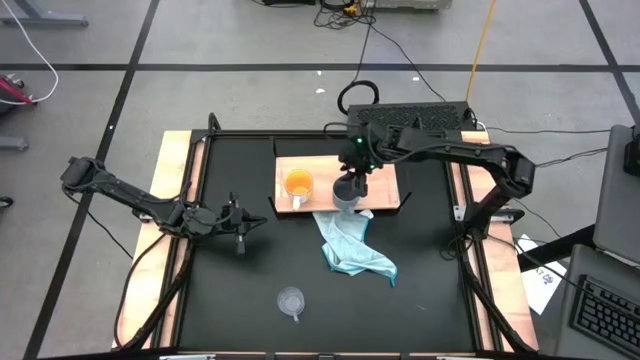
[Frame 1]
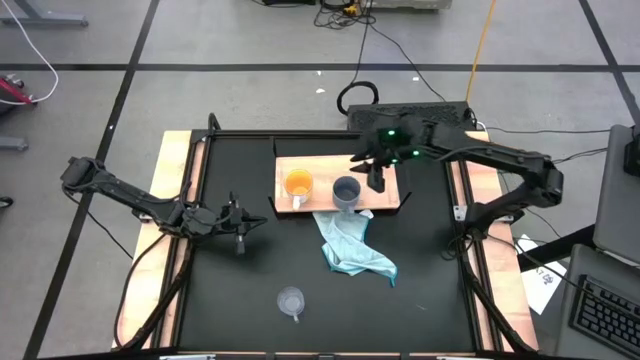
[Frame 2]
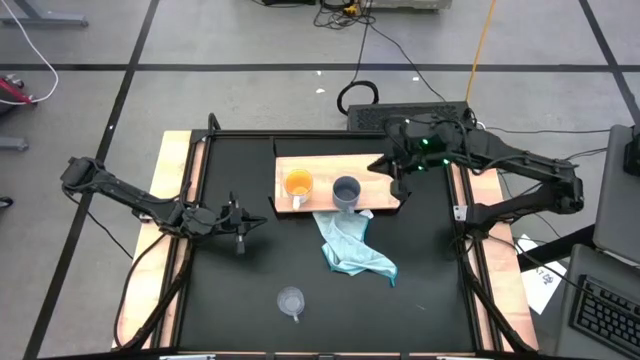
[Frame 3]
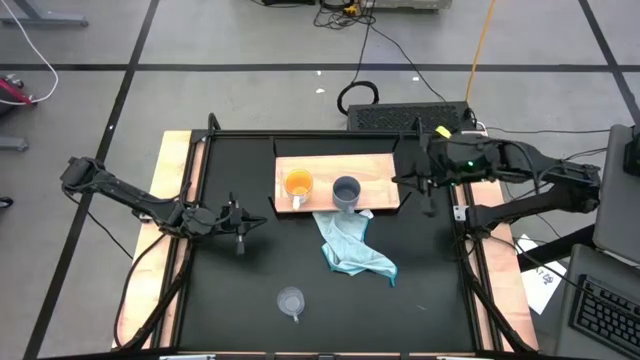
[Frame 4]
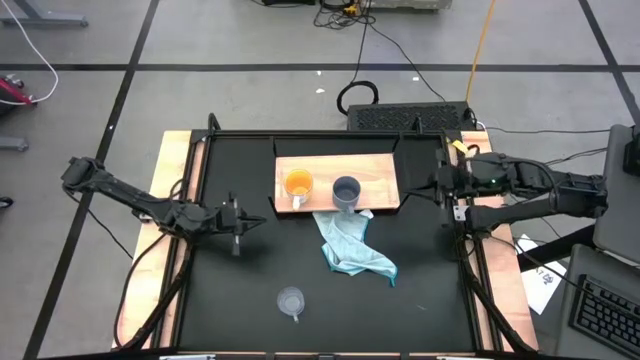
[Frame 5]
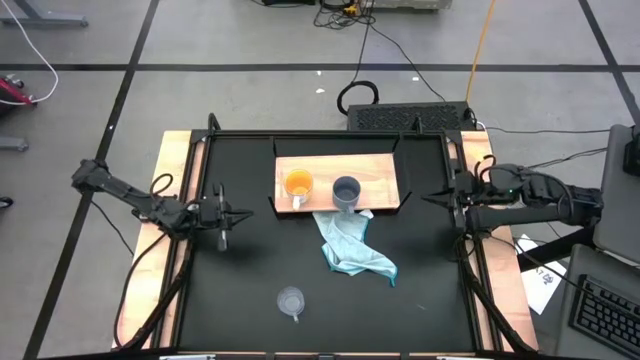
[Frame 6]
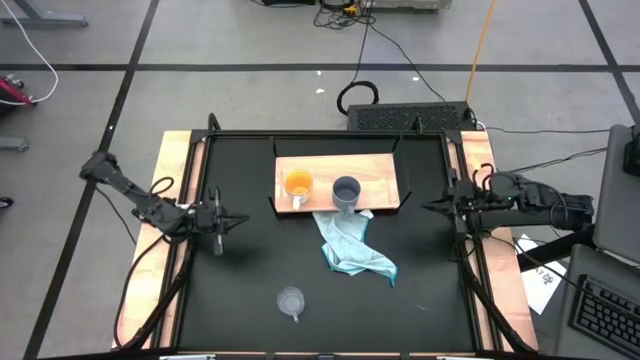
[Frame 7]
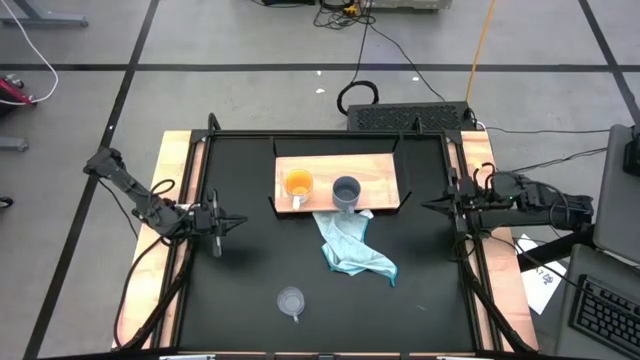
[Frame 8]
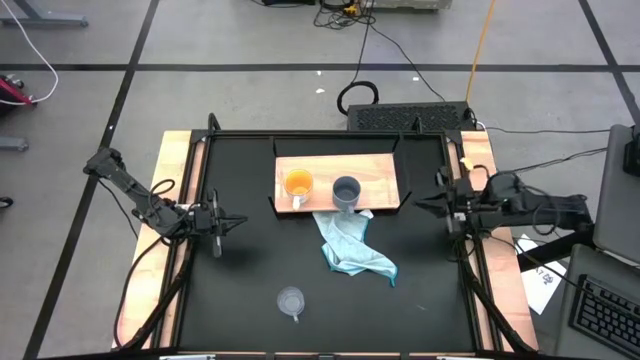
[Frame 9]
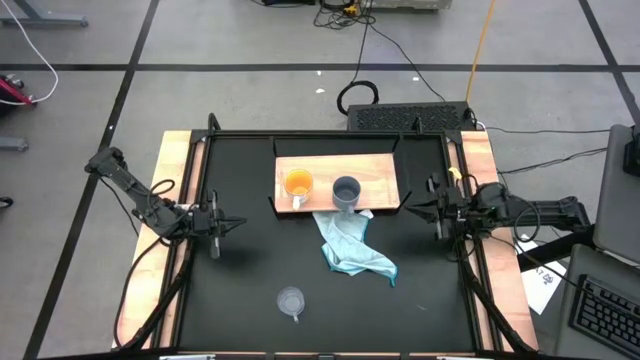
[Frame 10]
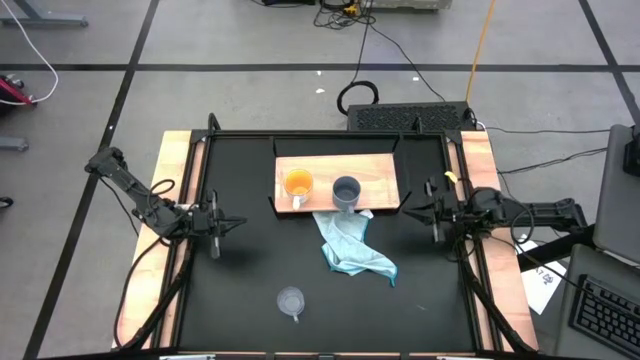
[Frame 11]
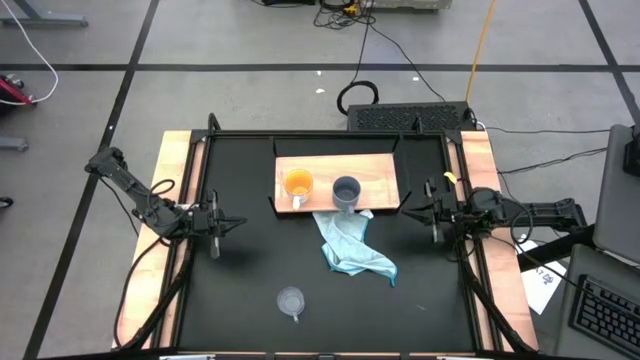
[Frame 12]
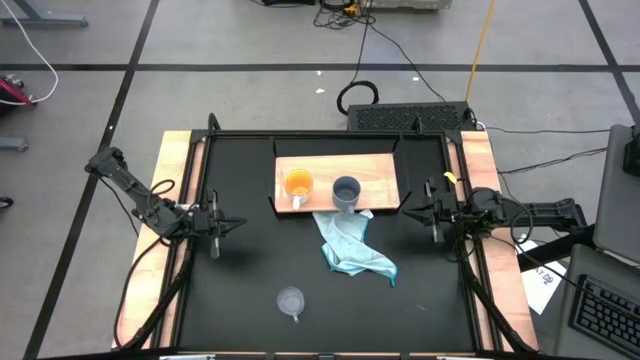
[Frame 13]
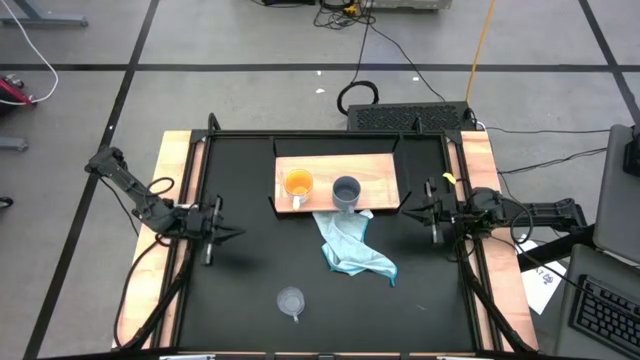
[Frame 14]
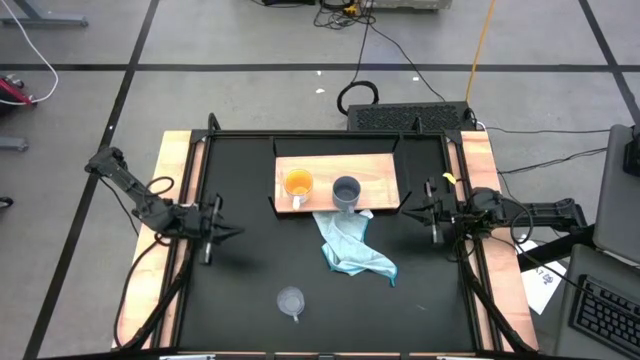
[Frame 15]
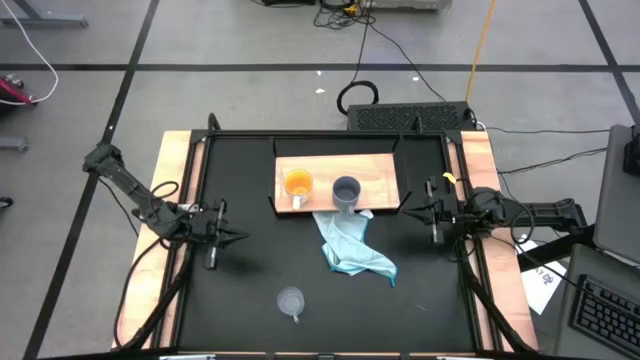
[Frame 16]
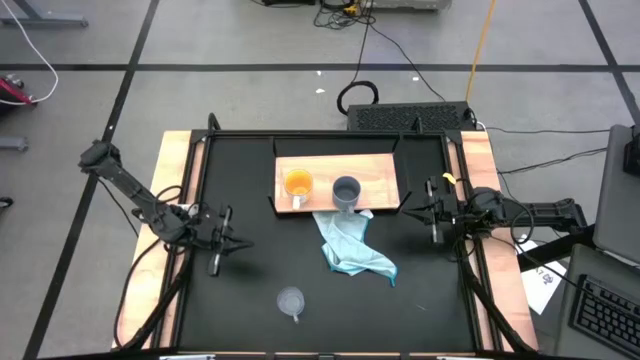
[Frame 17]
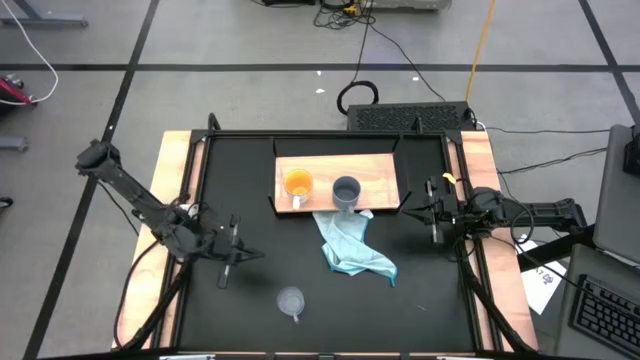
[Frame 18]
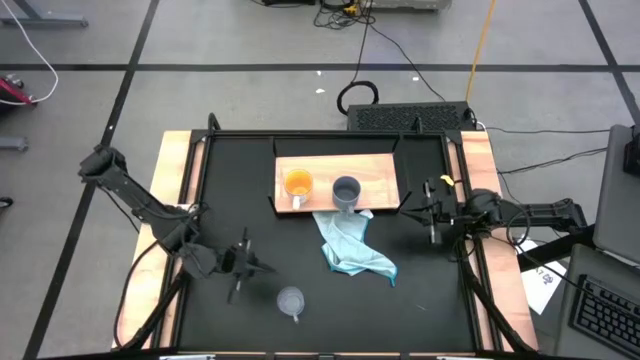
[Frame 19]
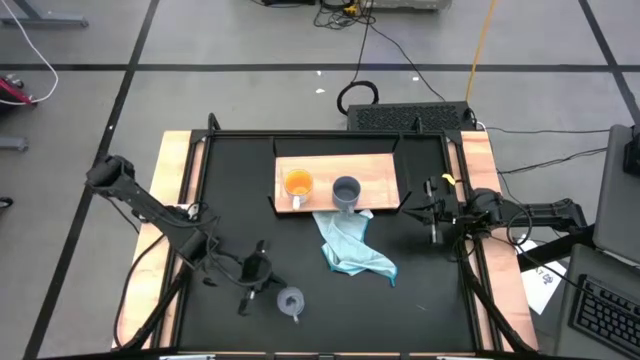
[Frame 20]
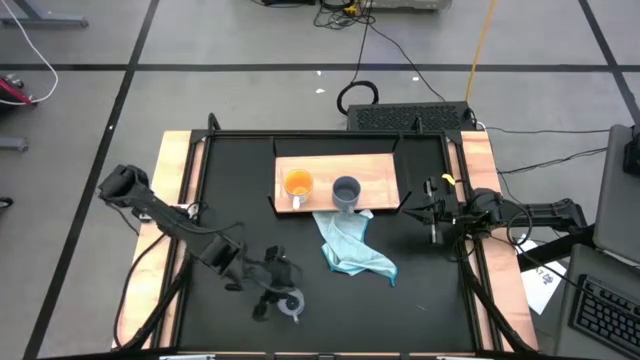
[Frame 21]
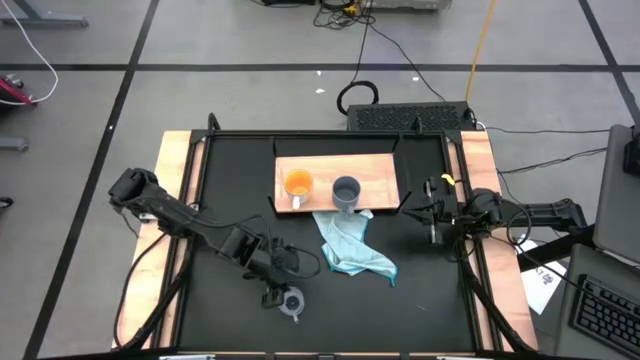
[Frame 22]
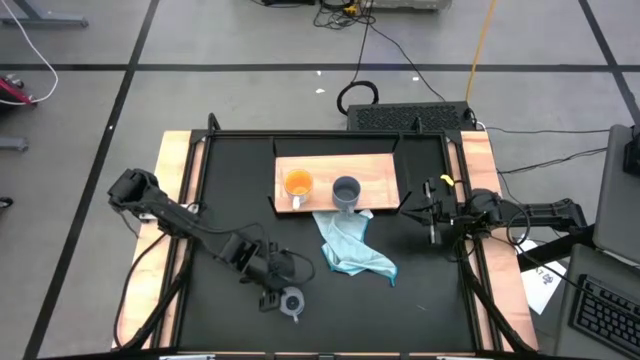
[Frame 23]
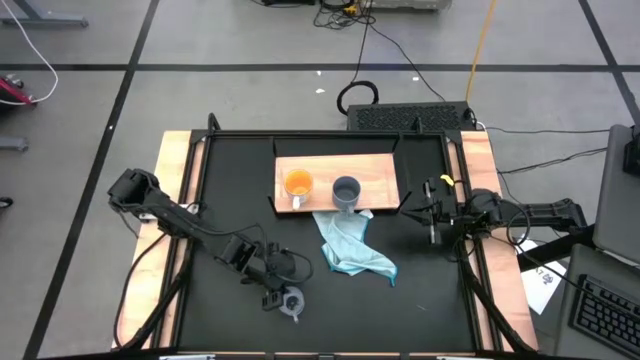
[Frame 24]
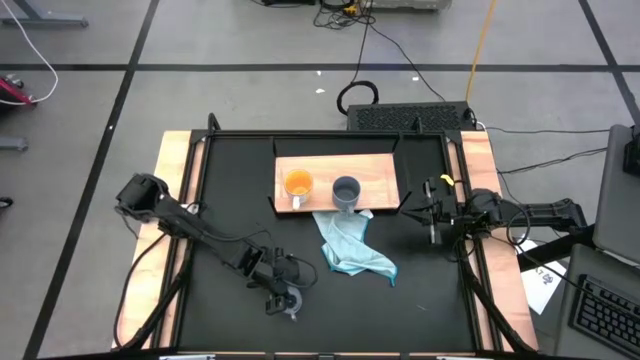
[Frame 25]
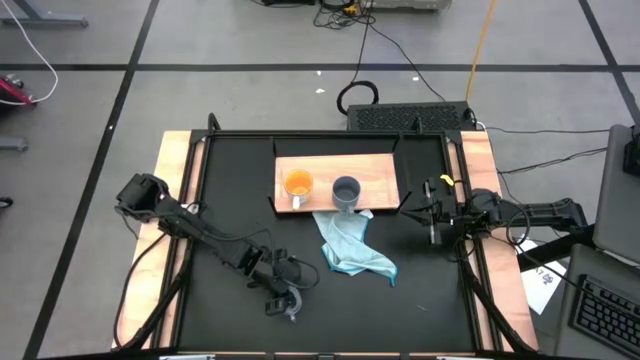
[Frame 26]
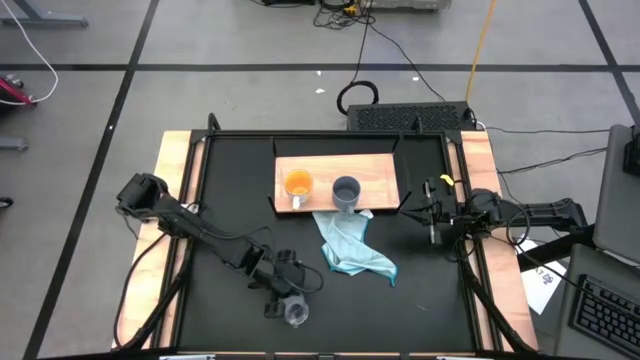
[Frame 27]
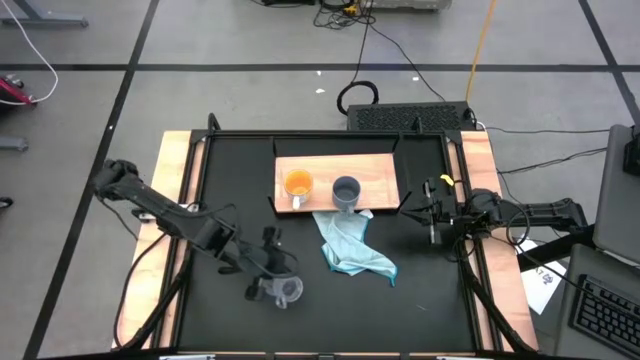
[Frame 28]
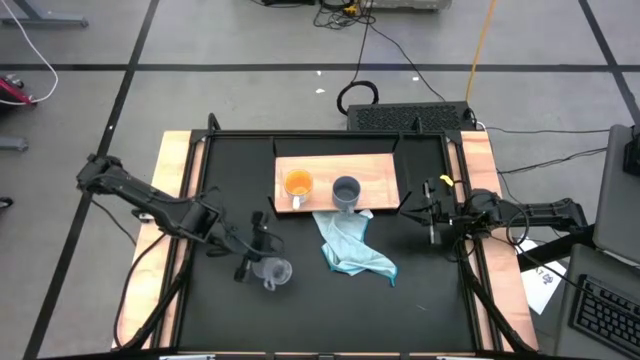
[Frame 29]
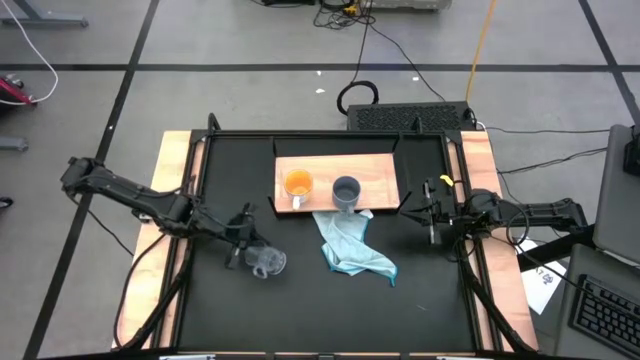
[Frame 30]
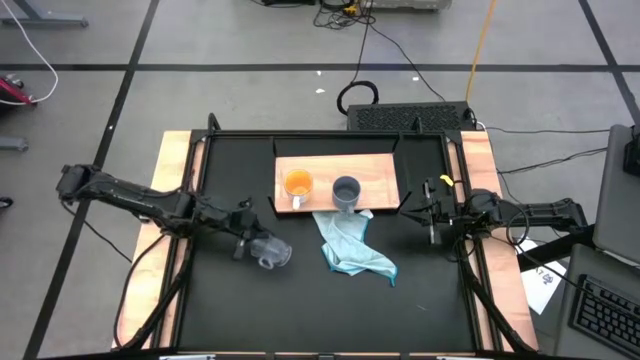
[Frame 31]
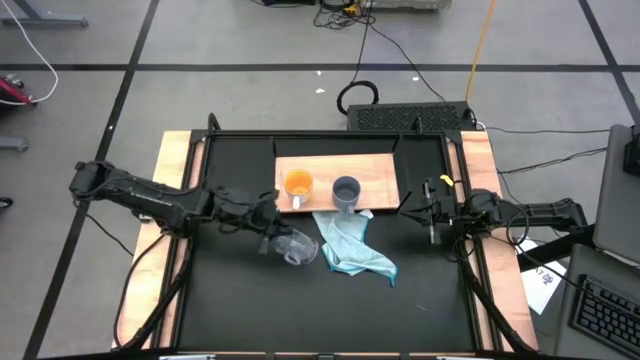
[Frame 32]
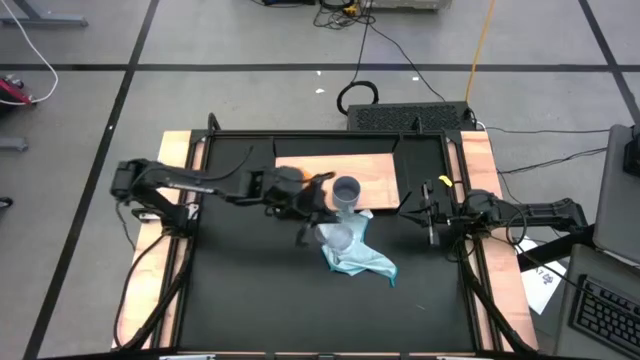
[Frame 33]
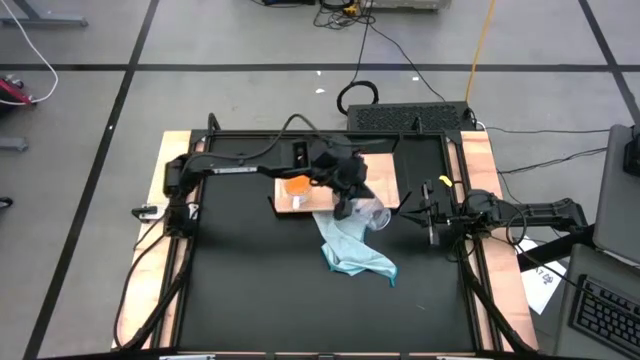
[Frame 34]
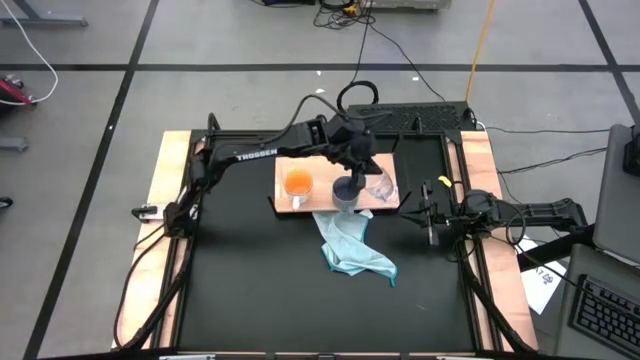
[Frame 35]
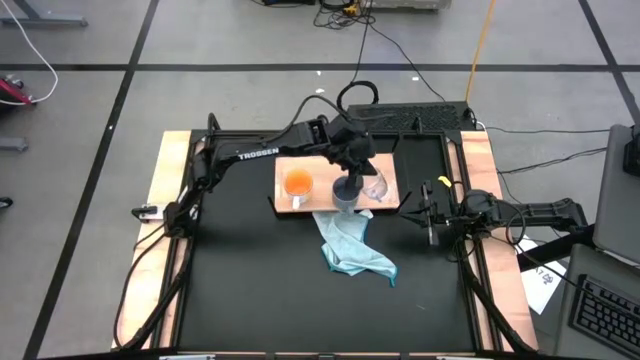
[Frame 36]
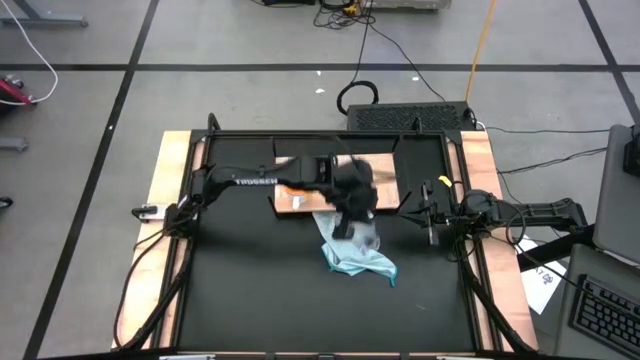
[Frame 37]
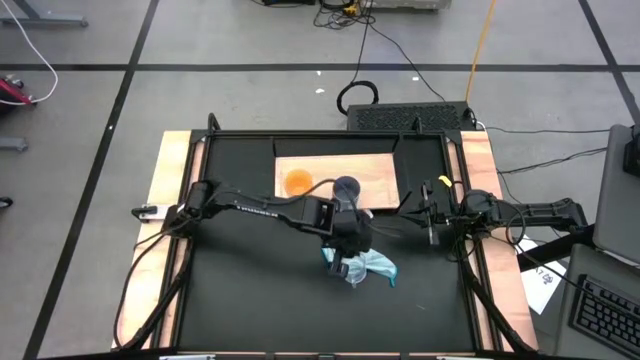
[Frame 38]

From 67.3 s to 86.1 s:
Task: Stack small to large cups/mugs on shelf
Put the transparent mug on the shelf

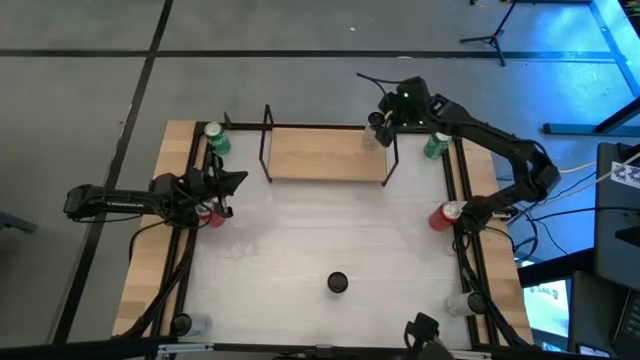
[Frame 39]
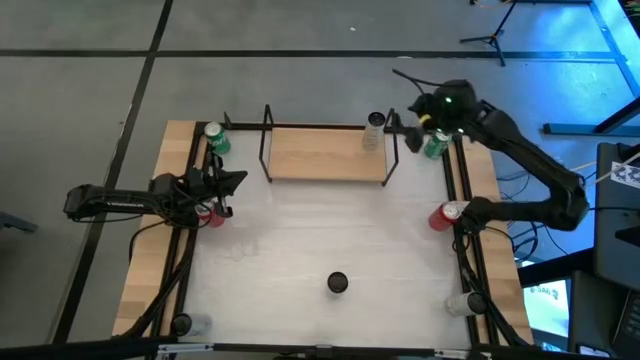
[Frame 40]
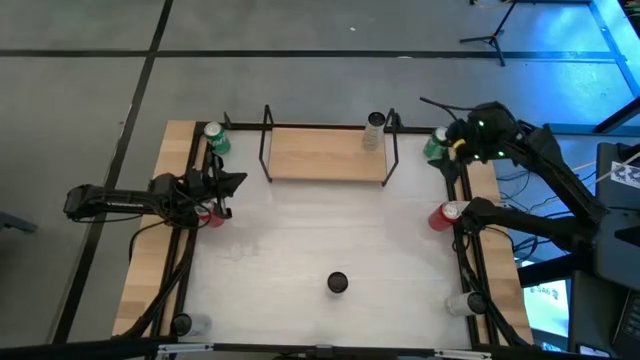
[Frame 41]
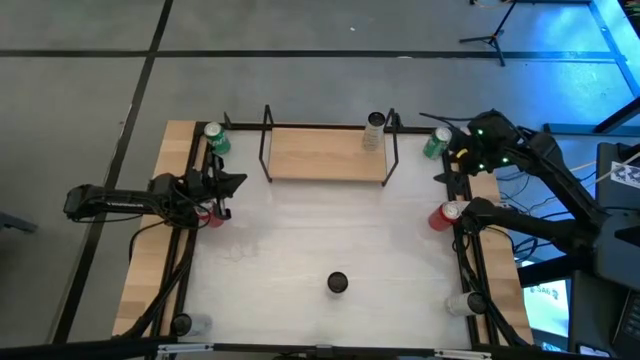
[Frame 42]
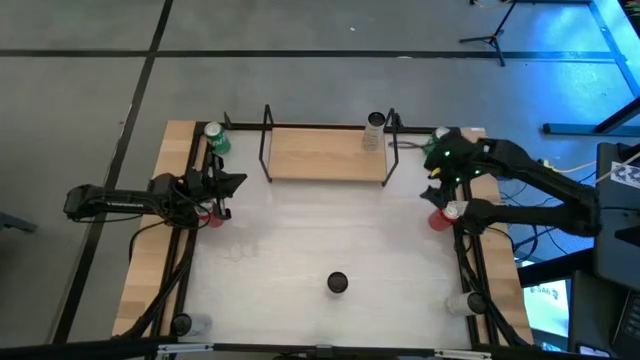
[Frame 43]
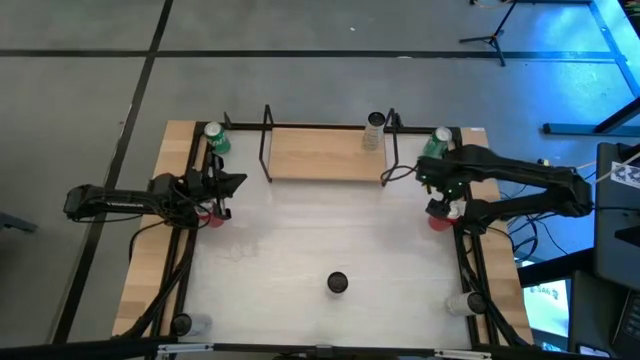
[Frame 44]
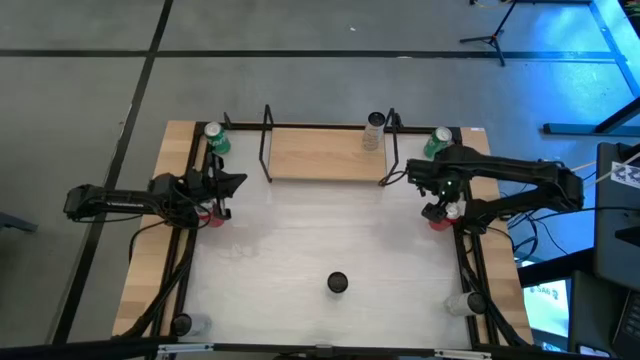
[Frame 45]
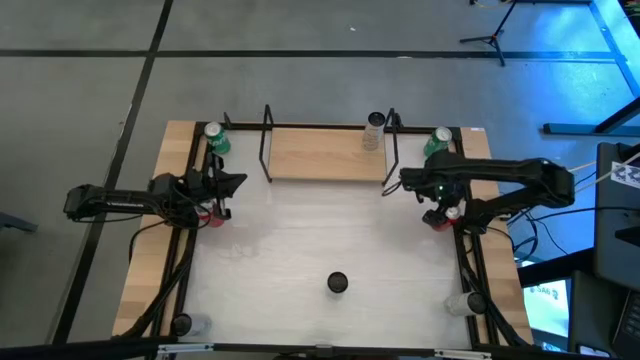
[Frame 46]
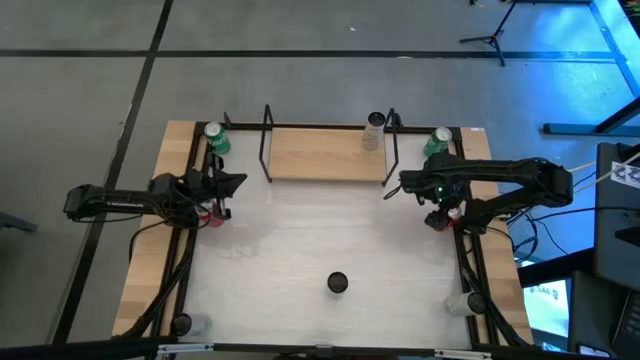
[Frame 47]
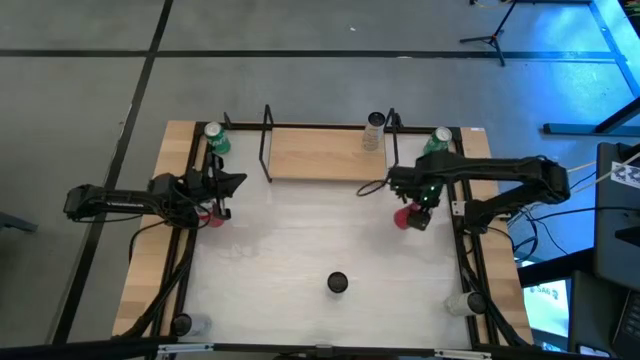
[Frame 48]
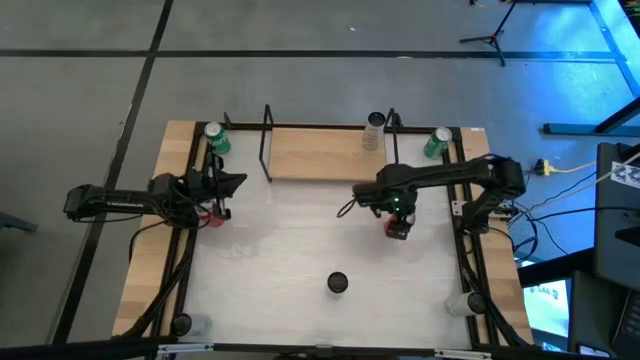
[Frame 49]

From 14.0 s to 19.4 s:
Task: Place canned beverage on shelf
Move the red and black soda can to the center of the table
